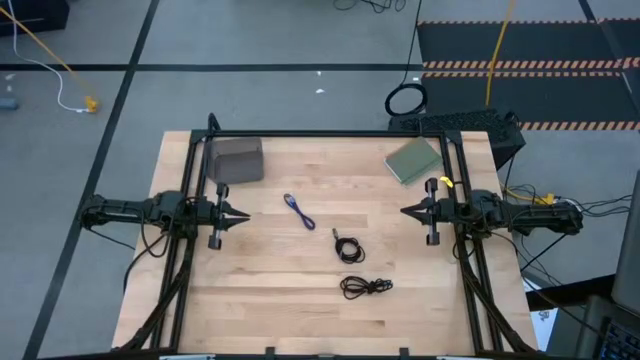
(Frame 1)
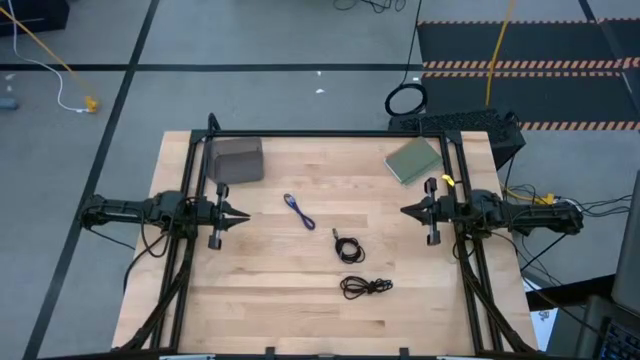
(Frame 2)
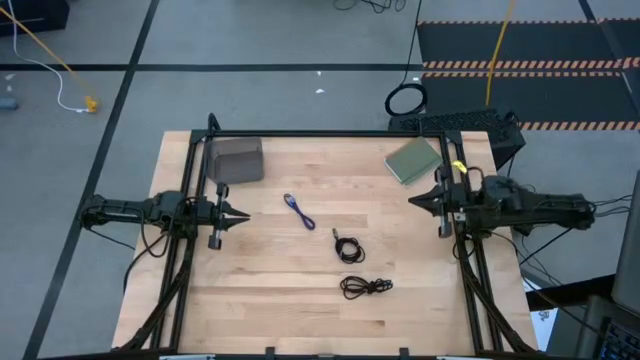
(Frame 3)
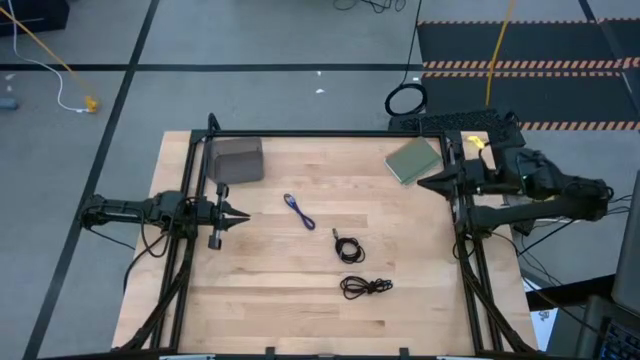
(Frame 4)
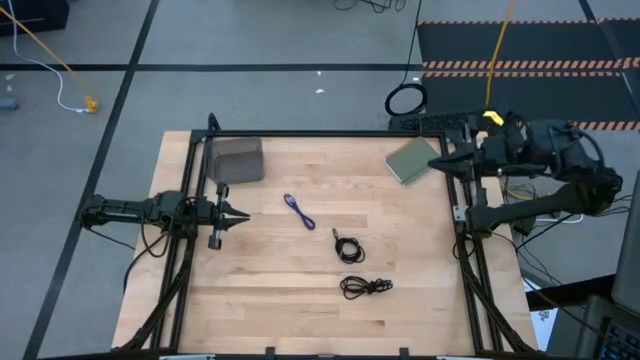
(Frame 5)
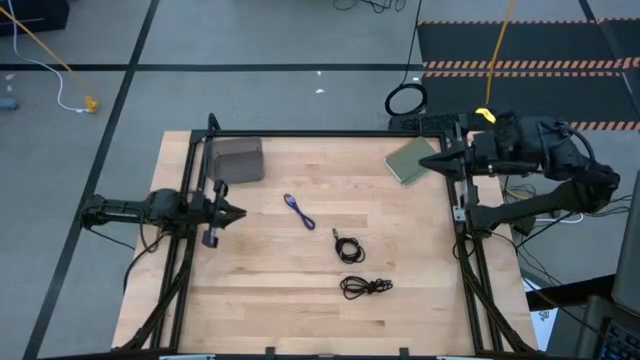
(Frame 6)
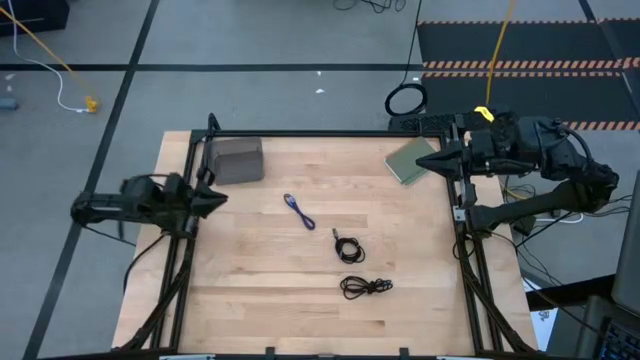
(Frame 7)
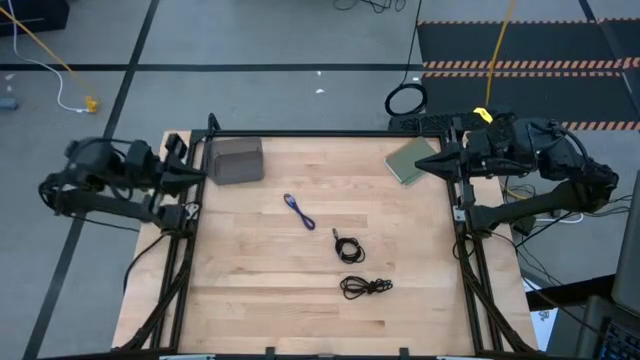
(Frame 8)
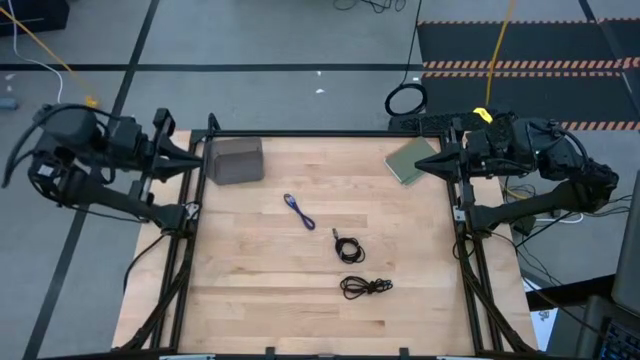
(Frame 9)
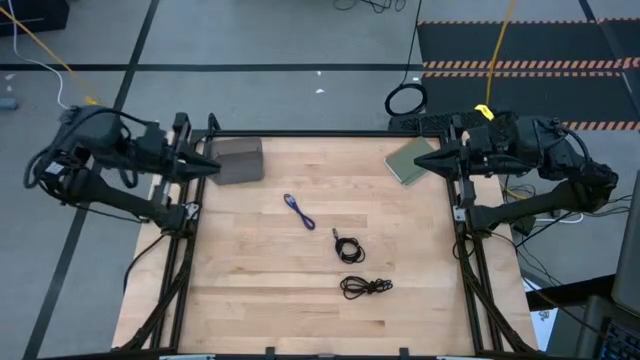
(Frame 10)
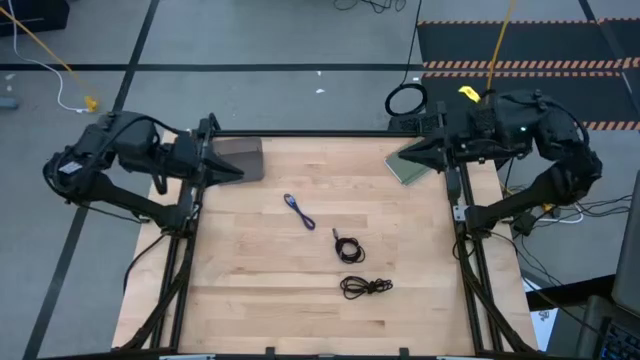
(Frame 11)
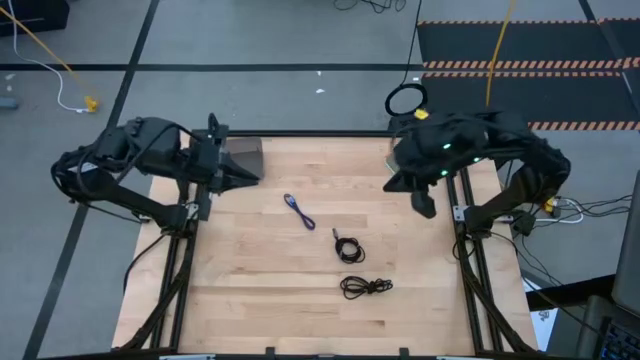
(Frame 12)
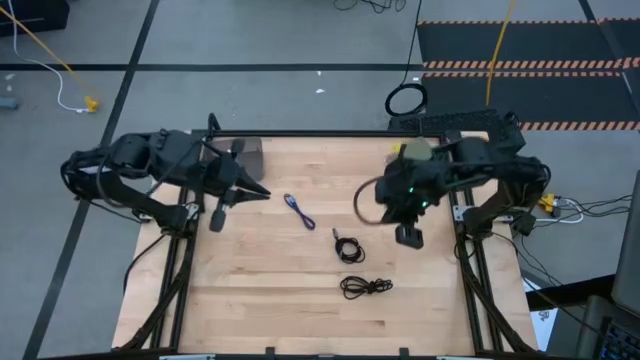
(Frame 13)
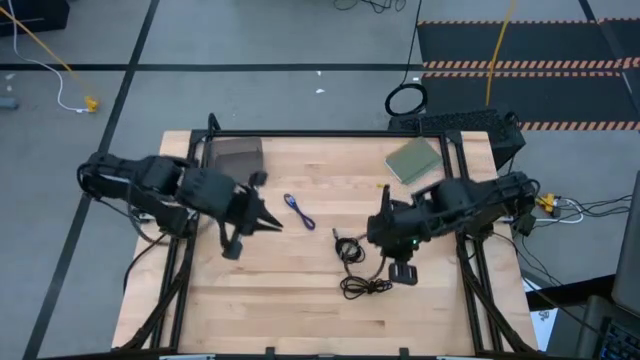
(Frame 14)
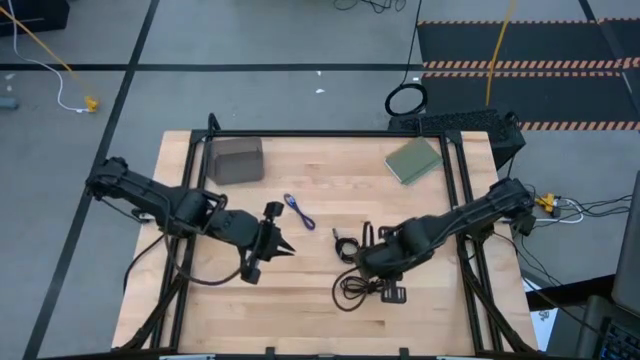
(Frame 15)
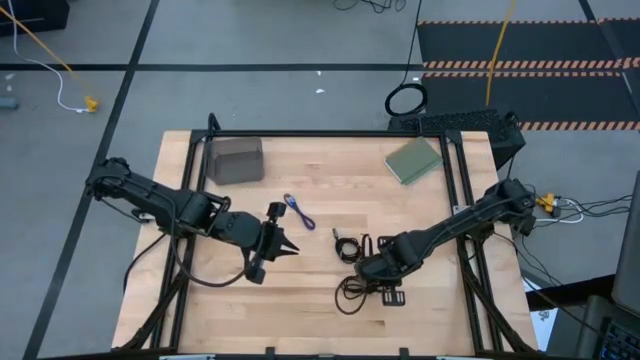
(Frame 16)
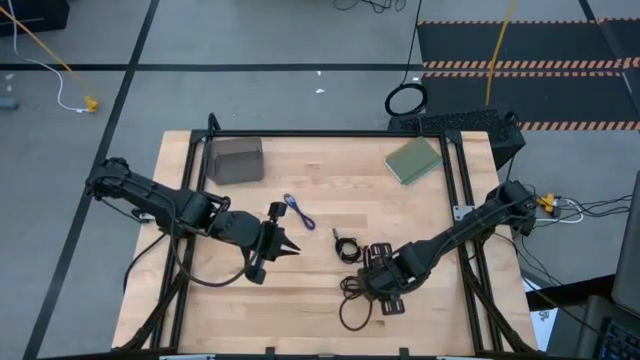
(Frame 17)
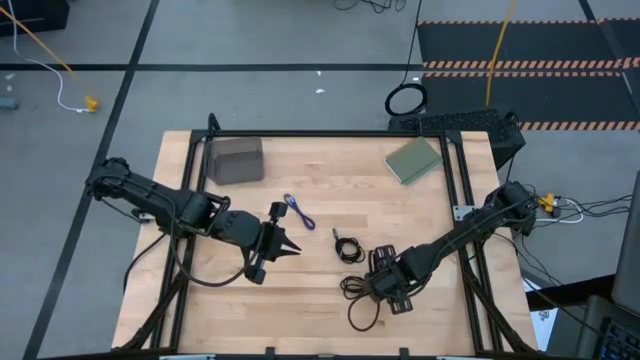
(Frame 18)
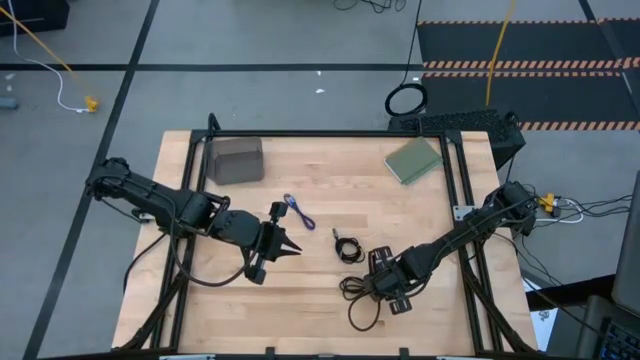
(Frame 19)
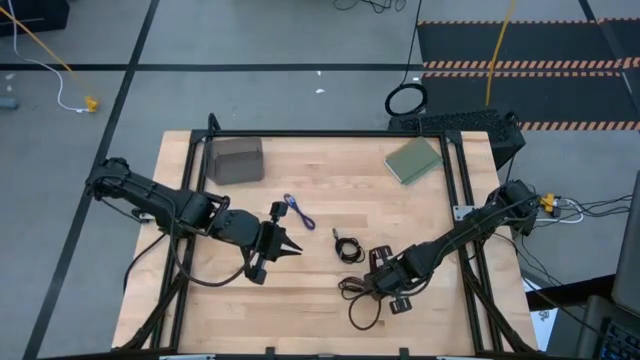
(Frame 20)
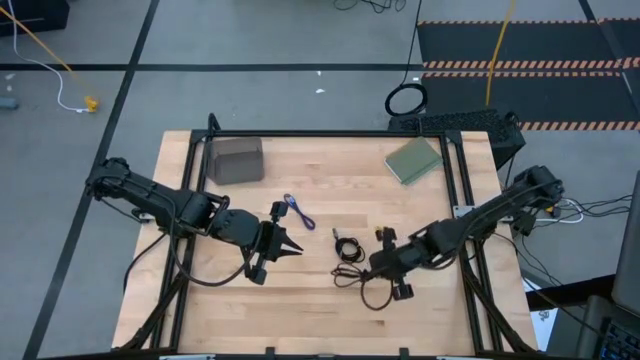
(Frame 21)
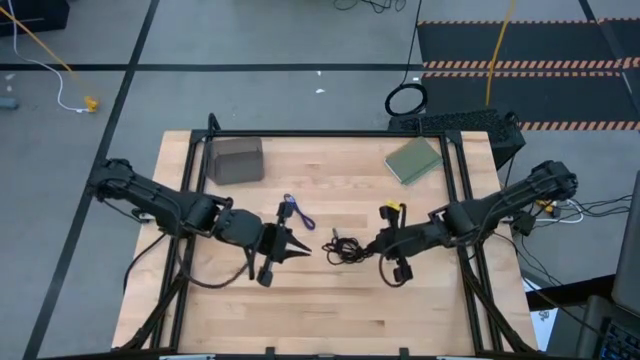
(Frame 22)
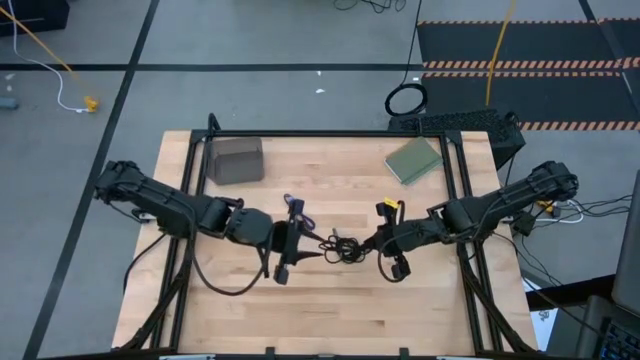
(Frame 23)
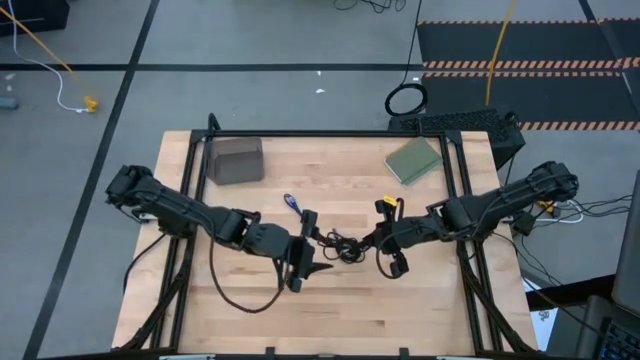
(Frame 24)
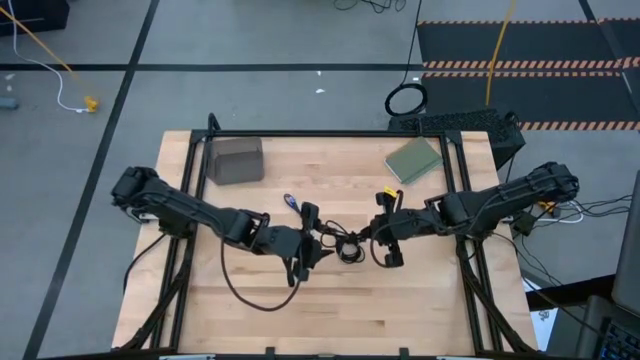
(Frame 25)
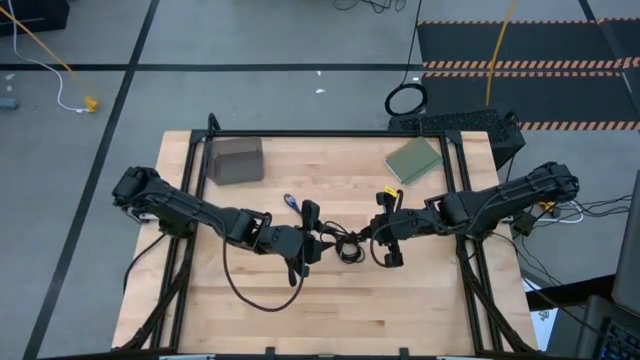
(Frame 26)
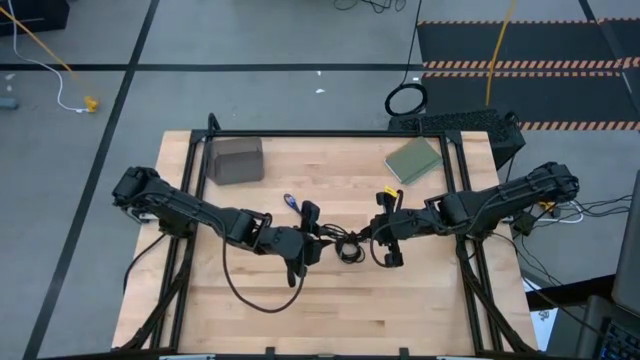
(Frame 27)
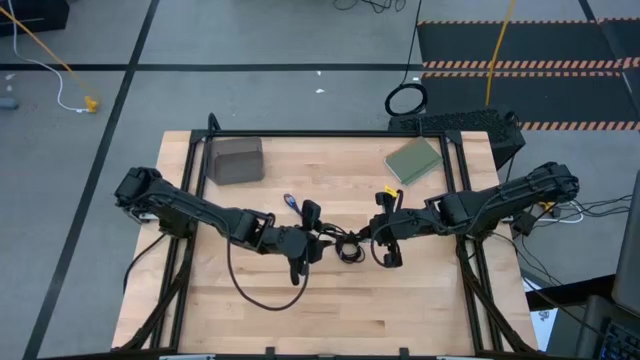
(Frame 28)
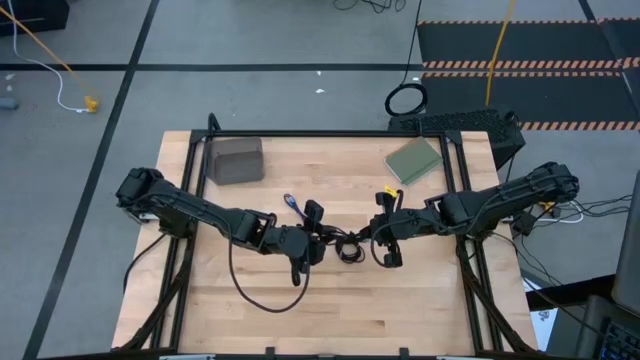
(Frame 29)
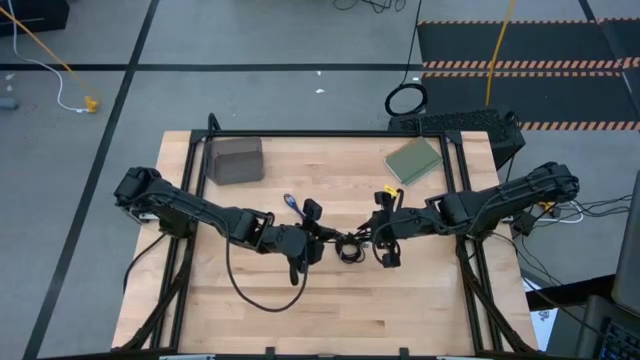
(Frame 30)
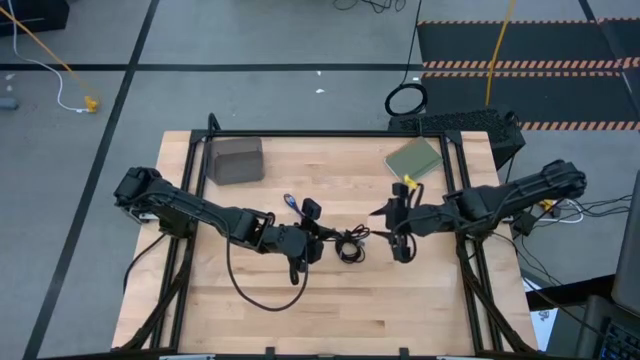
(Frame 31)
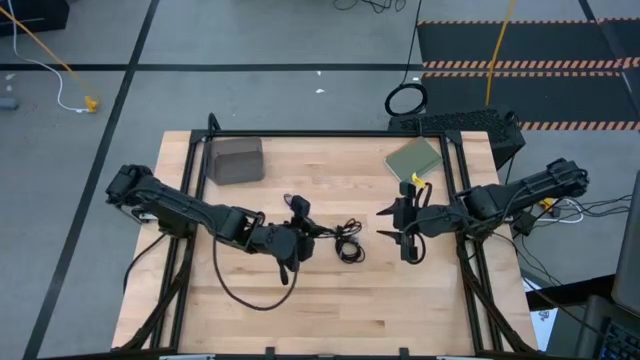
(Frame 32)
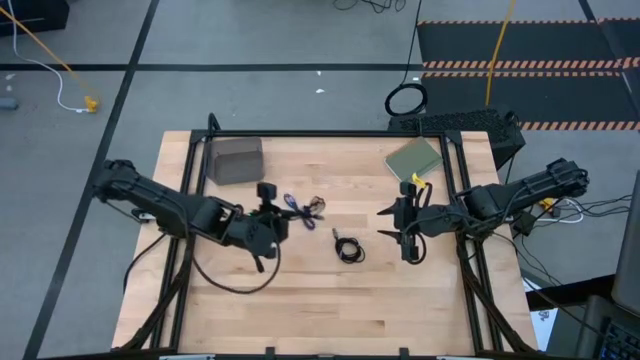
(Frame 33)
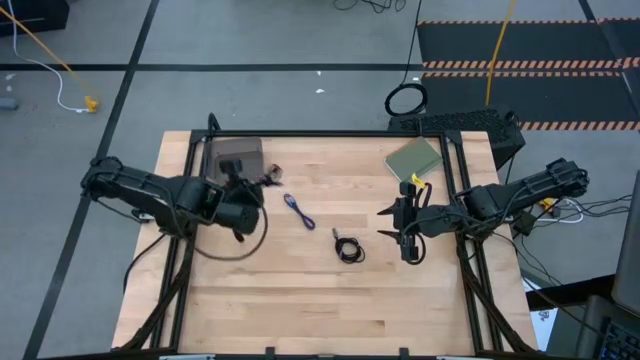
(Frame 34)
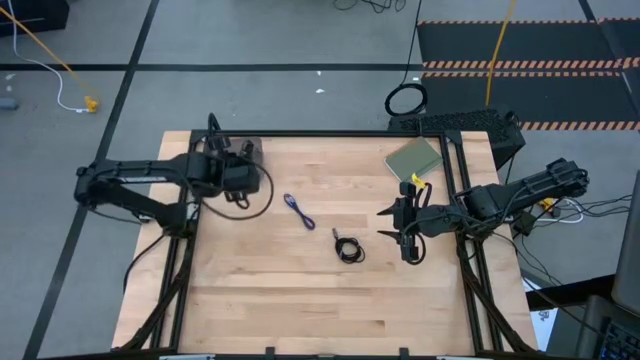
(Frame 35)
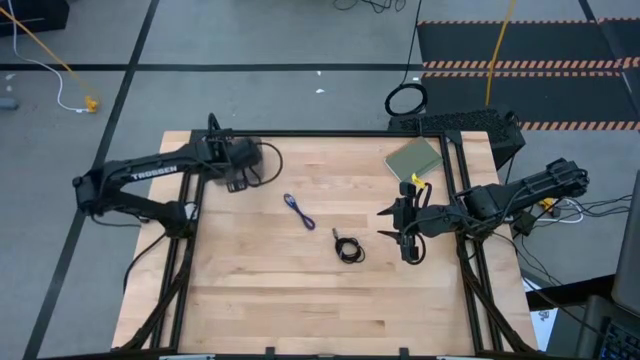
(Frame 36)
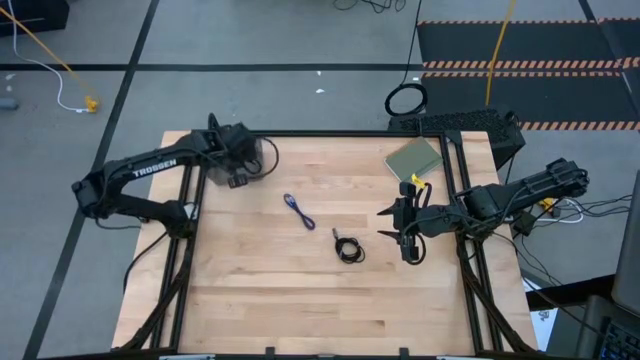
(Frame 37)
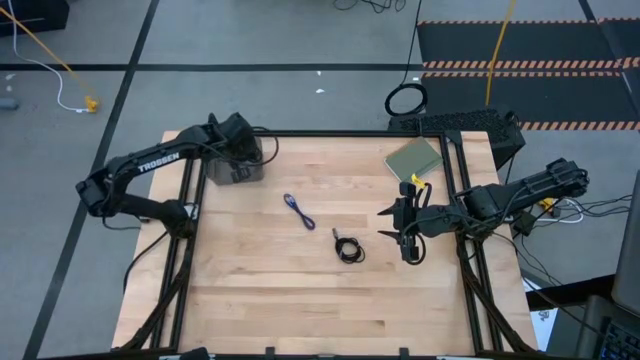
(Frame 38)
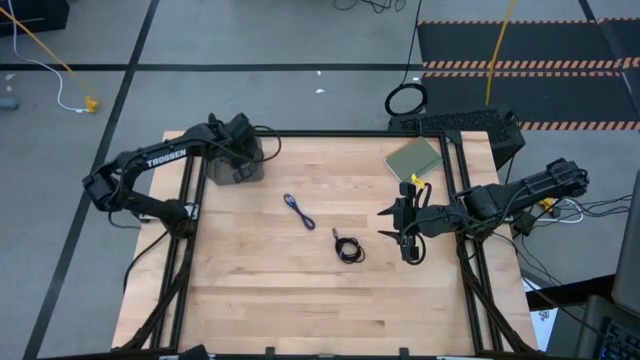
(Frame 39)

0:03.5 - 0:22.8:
Task: Pick and place USB-C Cables
Put the bottom black charger cable into the black bin

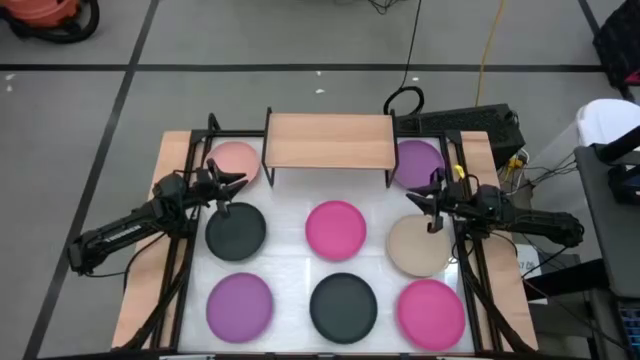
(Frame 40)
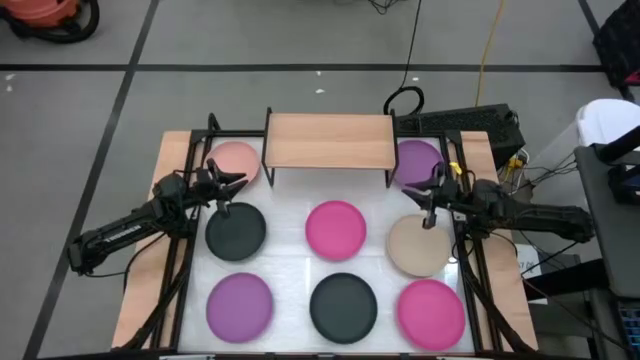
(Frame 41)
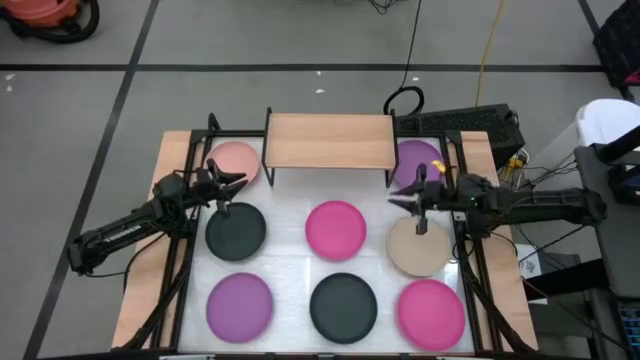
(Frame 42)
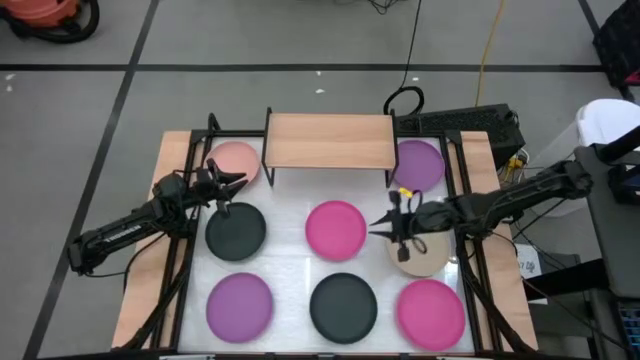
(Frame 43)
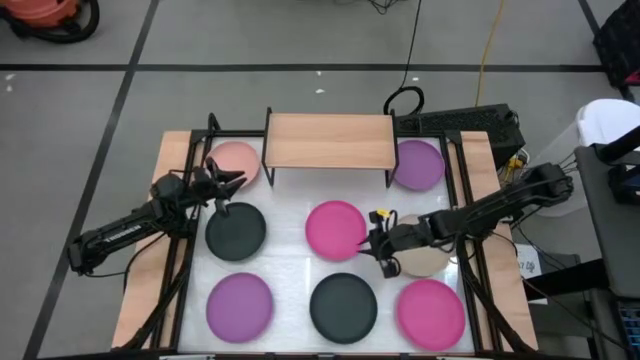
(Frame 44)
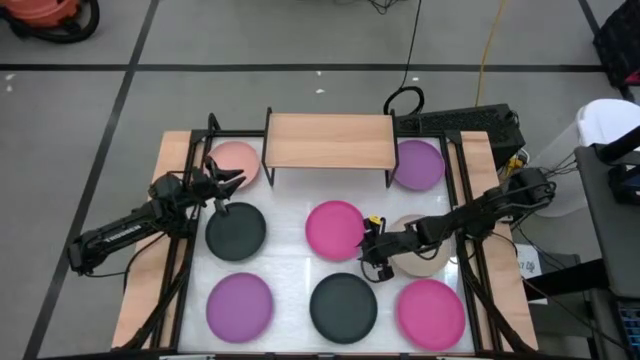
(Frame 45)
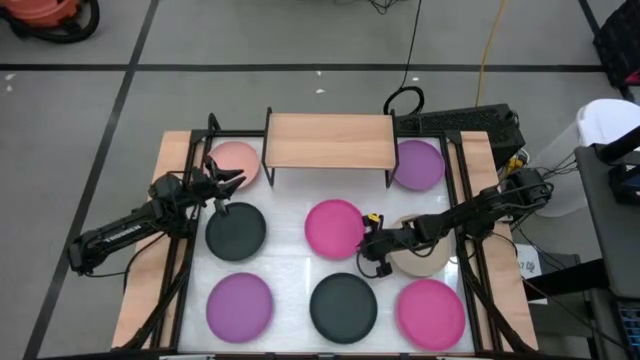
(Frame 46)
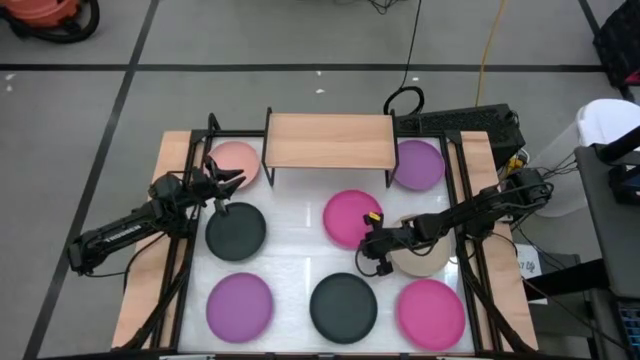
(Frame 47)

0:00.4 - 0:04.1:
Task: Place and stack plates onto a shelf
Put the top pink plate on the shelf
